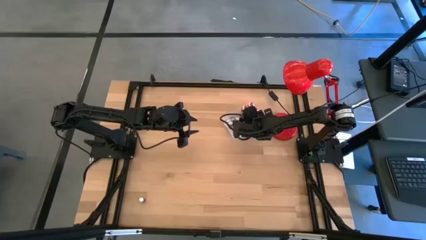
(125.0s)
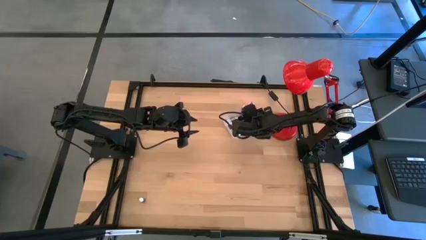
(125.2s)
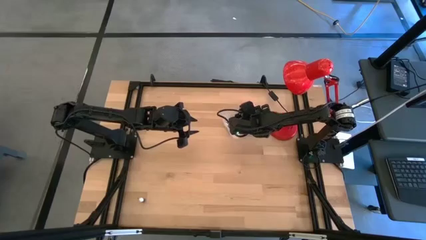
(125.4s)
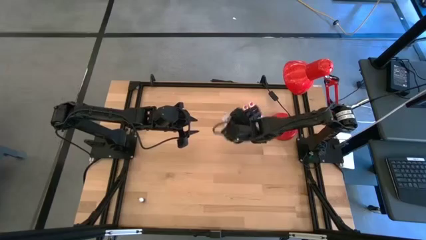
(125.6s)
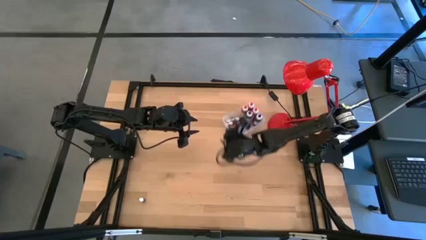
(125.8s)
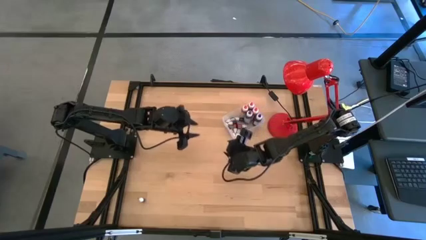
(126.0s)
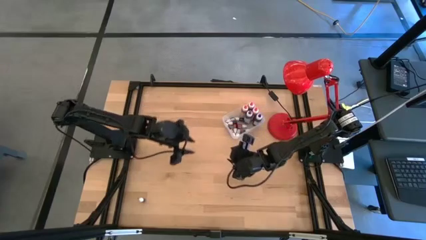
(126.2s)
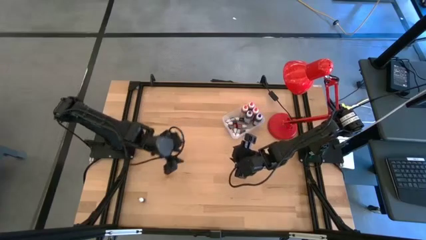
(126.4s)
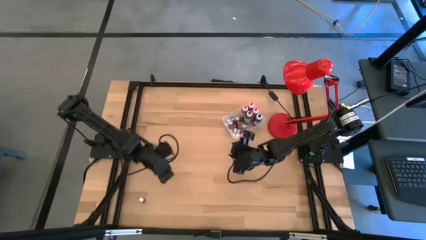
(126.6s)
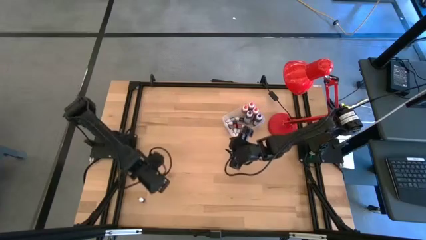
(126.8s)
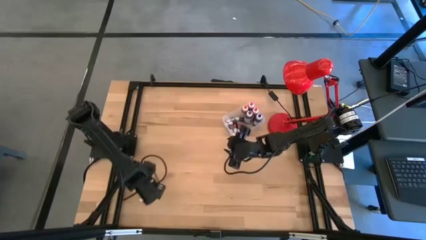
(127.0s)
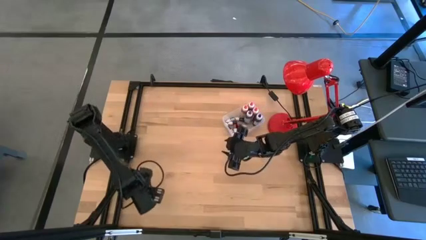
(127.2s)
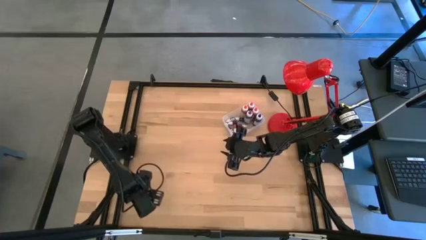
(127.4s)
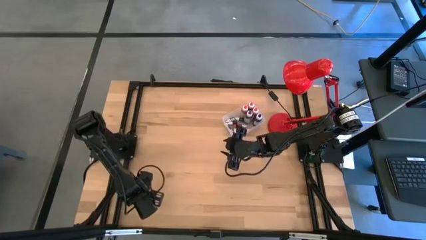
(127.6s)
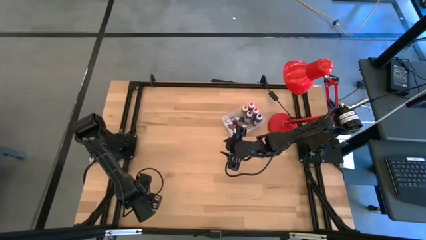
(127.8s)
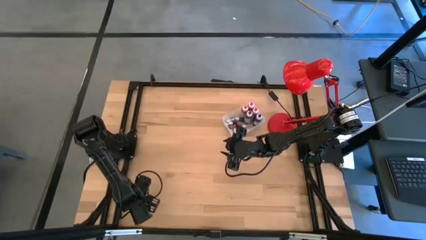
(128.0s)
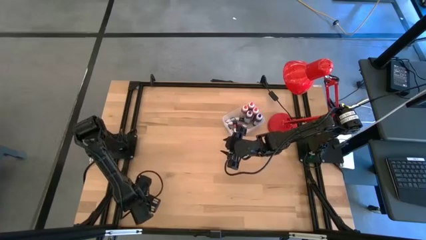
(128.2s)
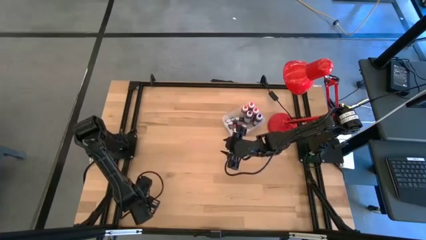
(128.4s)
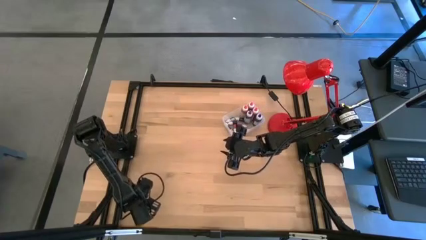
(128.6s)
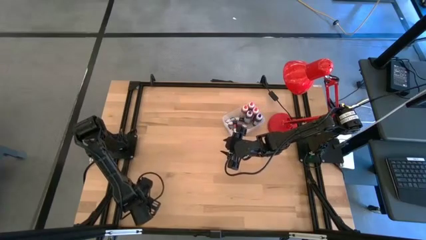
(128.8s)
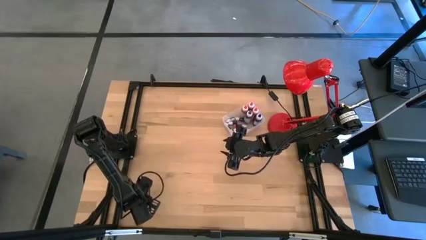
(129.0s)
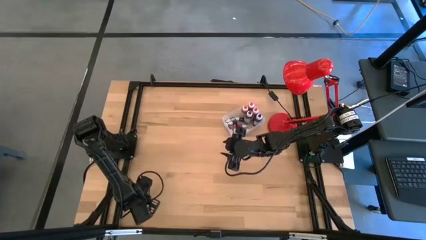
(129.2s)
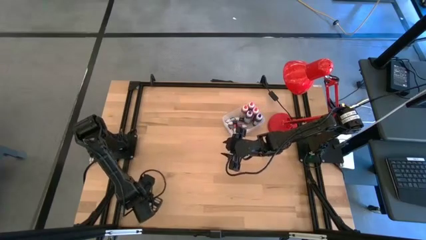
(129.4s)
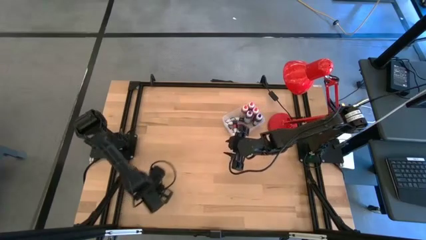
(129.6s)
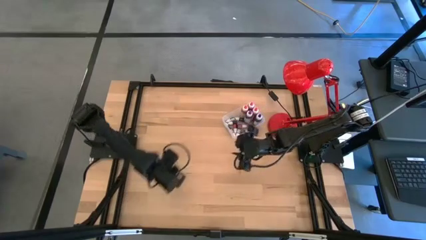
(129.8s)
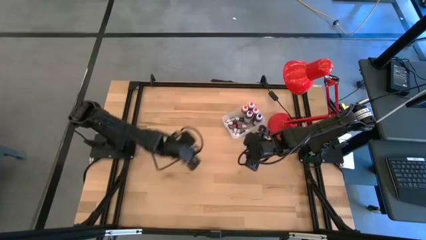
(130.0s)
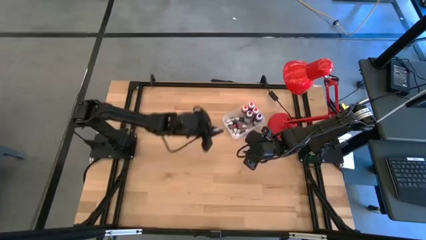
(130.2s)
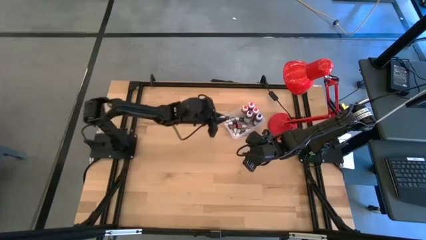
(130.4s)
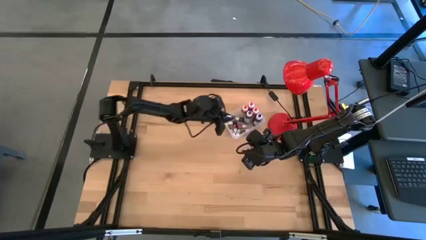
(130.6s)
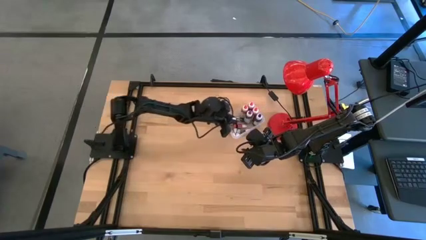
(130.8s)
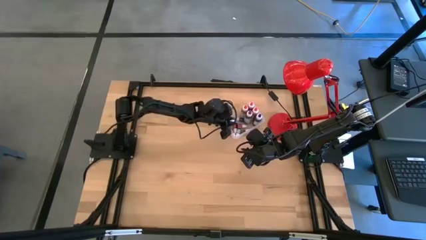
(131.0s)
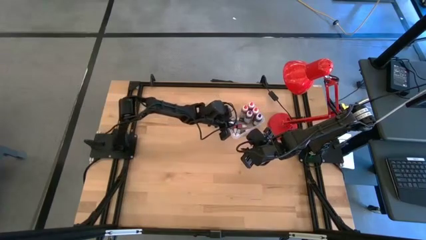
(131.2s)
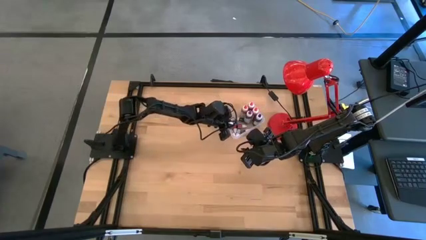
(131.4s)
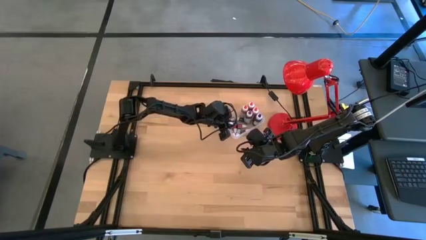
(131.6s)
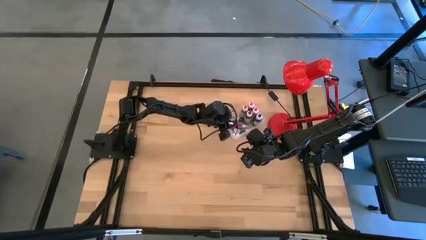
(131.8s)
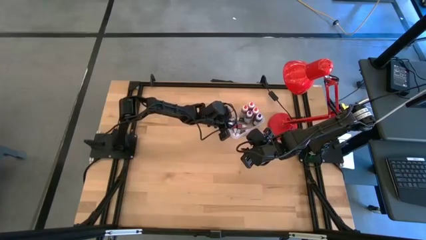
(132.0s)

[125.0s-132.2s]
Task: Pick & Place food coloring
Put the small brown food coloring bottle in the transparent bin

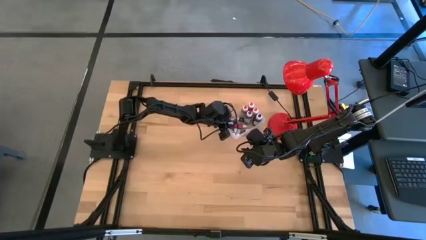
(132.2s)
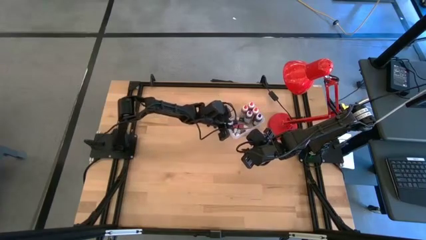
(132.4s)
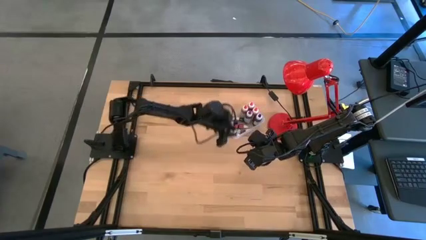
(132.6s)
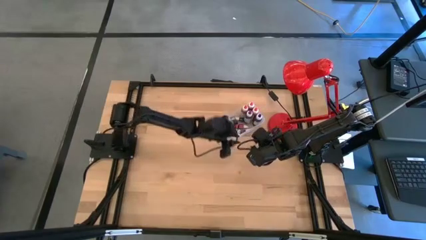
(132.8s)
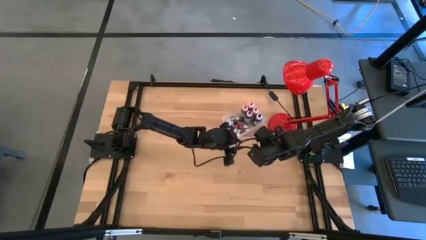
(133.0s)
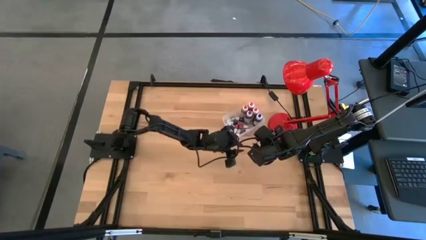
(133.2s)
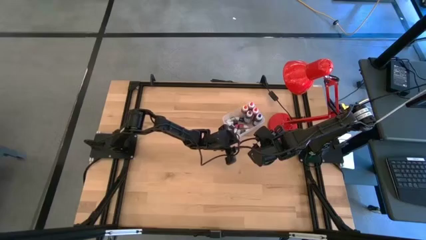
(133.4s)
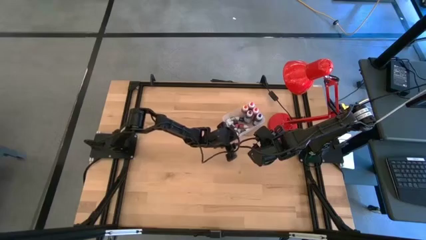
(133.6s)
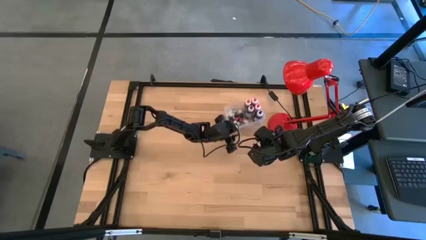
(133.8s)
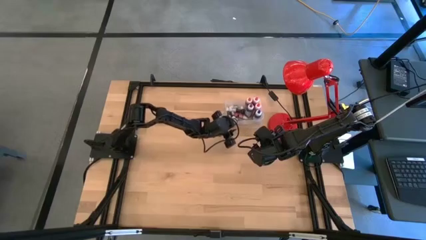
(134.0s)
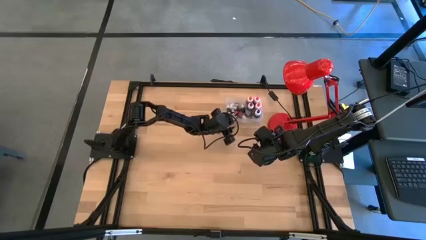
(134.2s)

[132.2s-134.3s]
Adjust the transparent bin

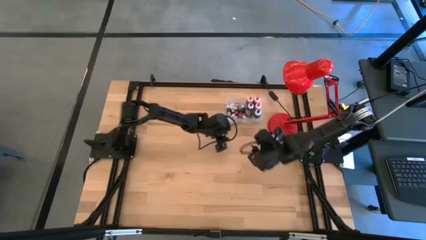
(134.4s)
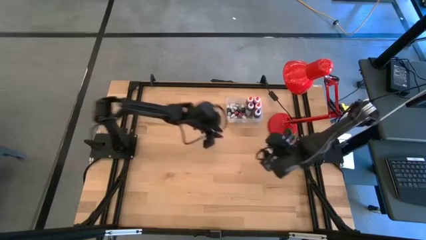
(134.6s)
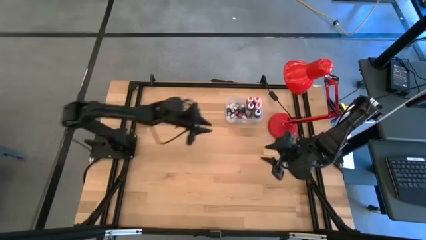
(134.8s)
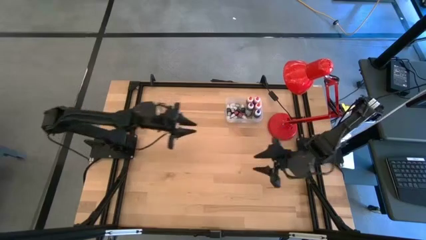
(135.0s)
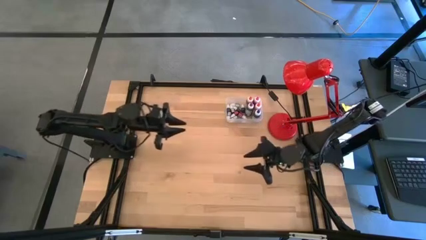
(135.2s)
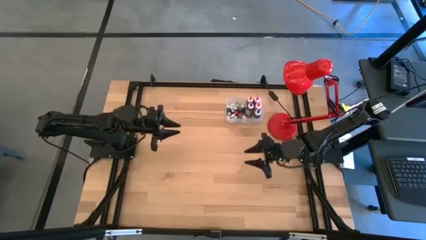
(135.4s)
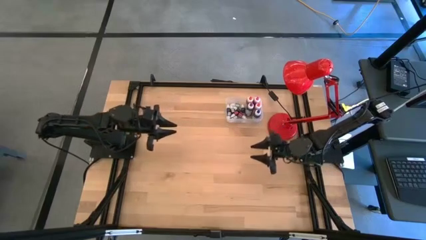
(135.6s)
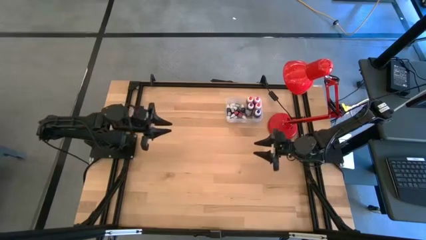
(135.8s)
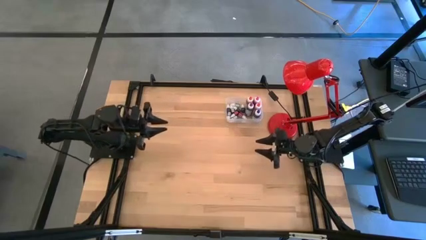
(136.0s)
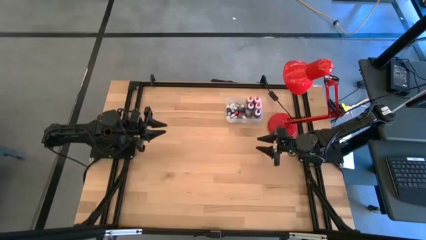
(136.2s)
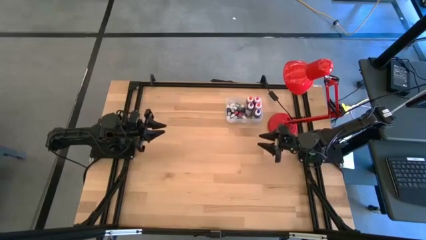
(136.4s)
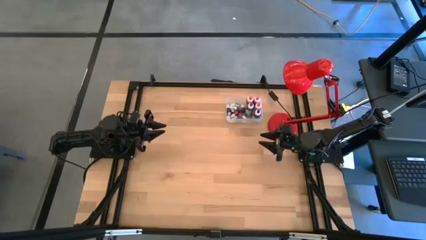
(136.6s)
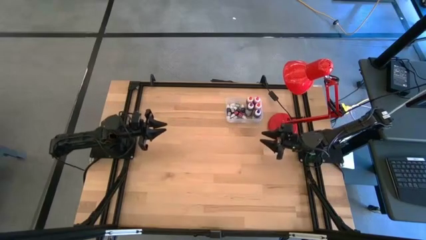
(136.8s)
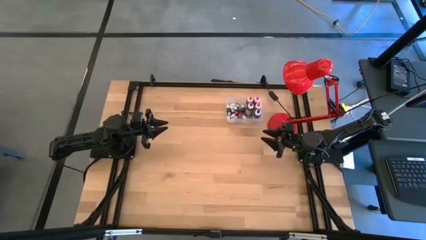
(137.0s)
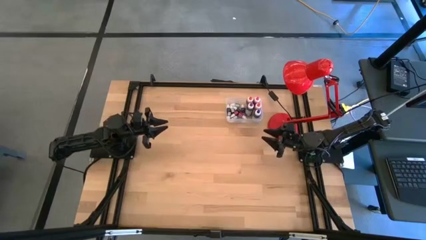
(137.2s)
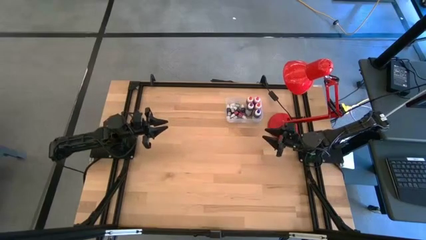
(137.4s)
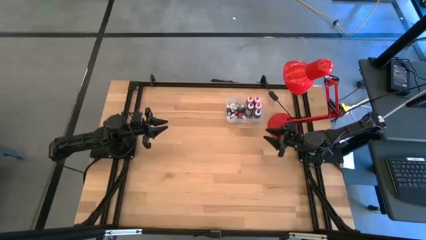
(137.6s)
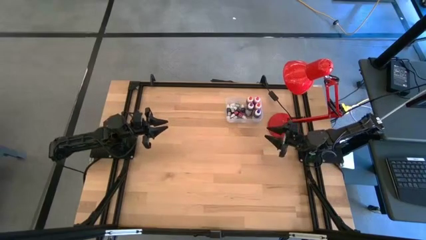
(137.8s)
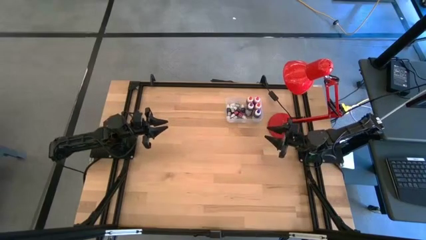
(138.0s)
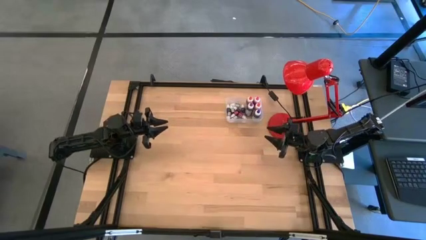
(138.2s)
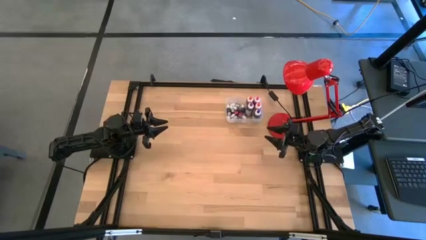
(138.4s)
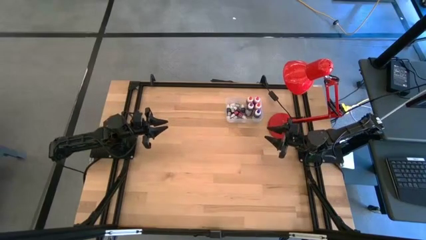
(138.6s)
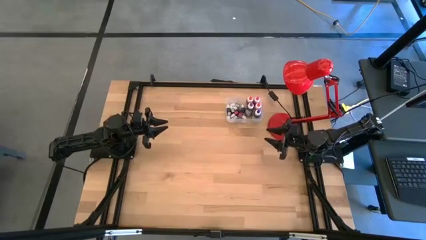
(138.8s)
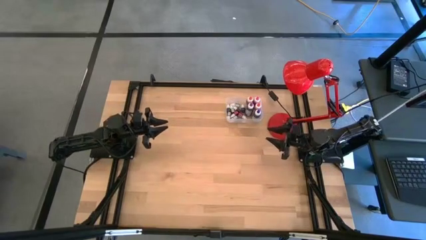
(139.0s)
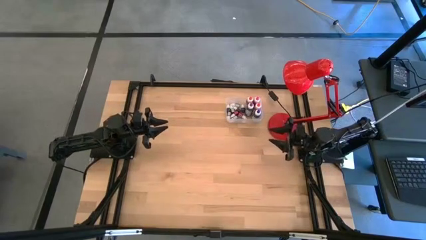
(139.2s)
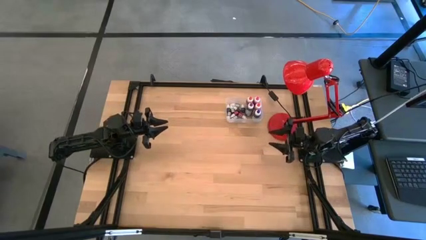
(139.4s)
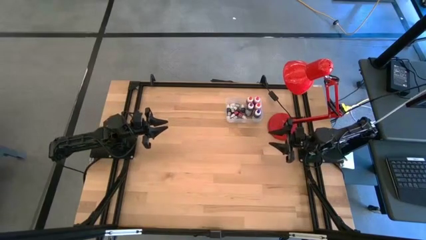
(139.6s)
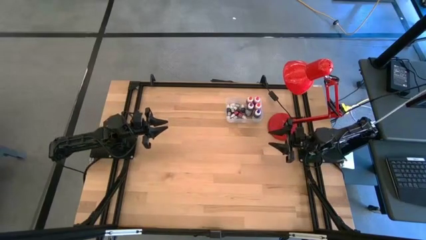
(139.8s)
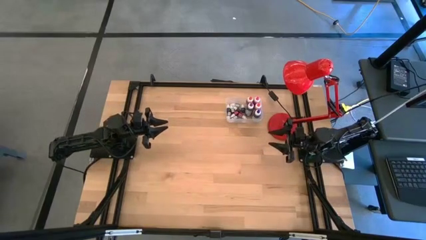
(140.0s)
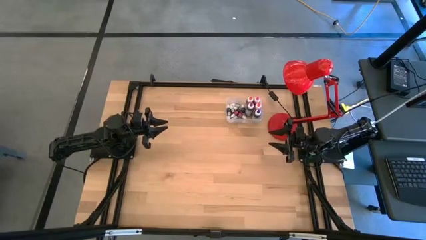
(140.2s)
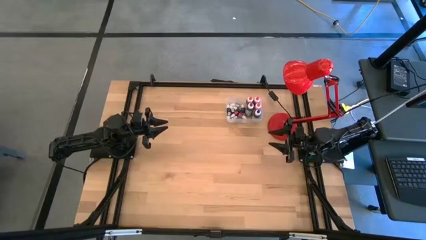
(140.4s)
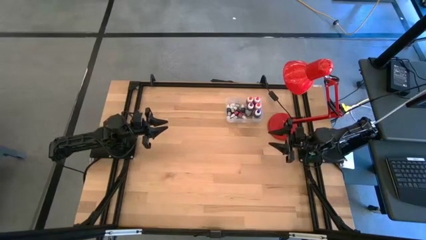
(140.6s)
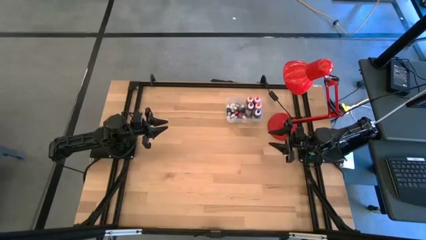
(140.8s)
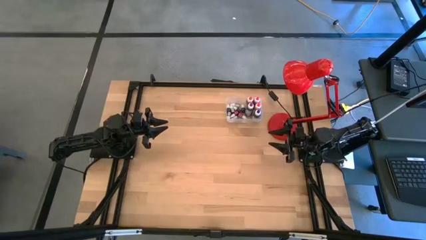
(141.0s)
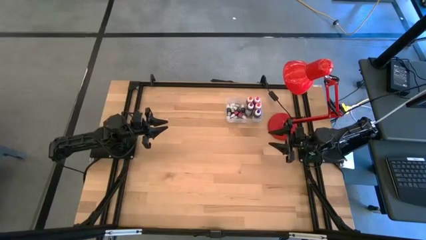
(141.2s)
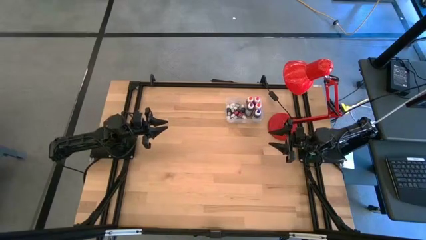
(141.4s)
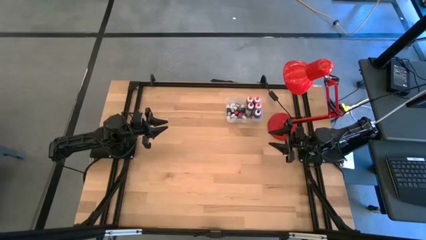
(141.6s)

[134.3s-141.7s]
Return to Home Position
